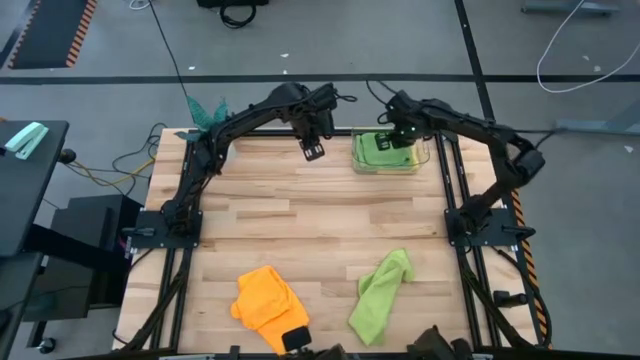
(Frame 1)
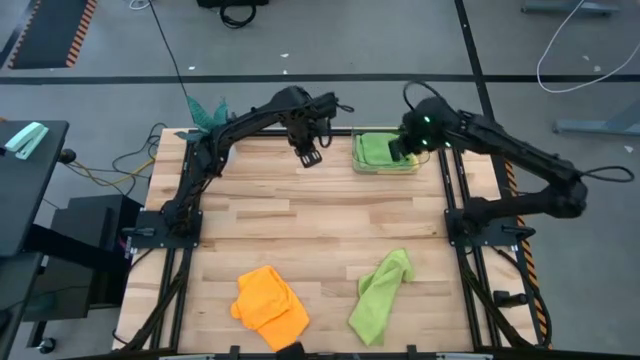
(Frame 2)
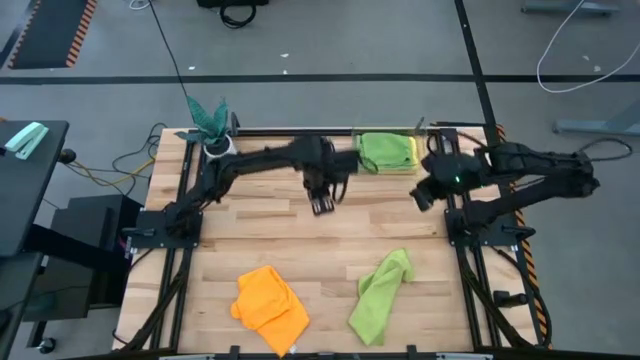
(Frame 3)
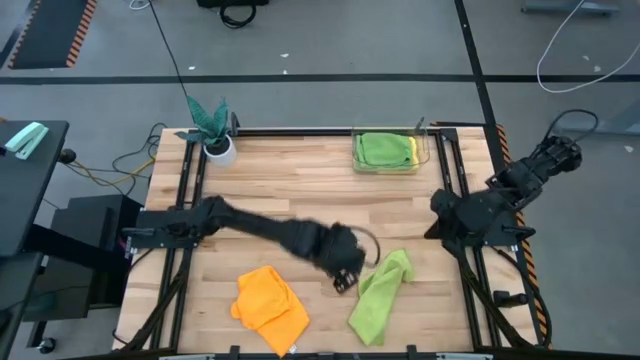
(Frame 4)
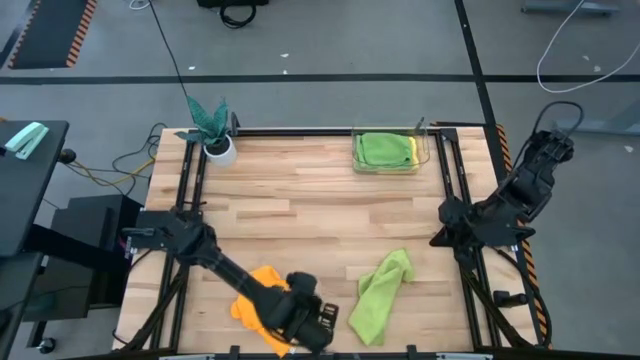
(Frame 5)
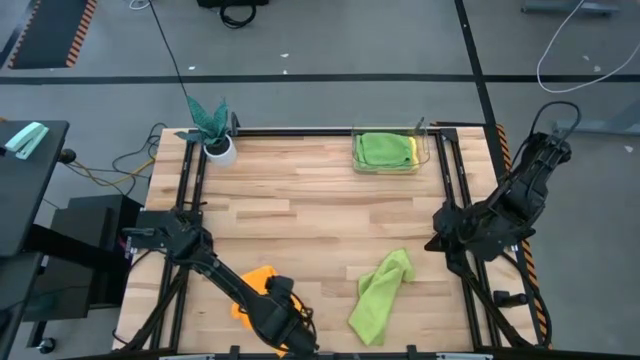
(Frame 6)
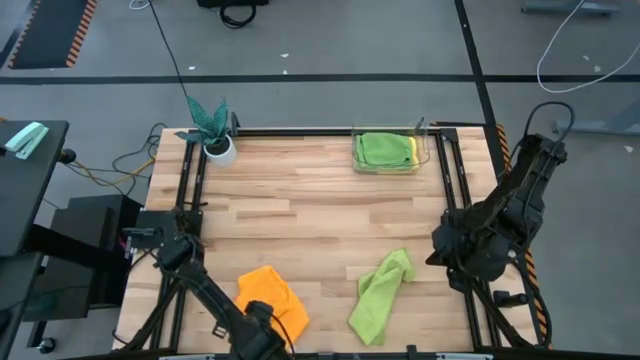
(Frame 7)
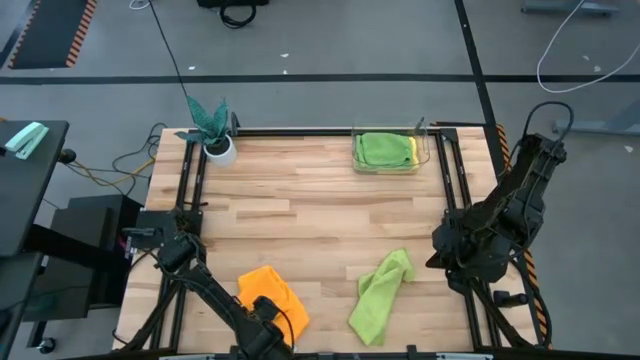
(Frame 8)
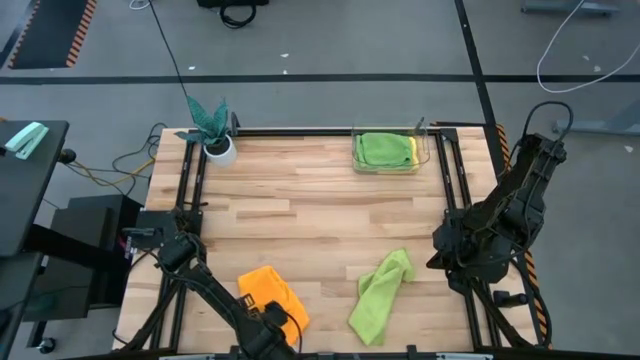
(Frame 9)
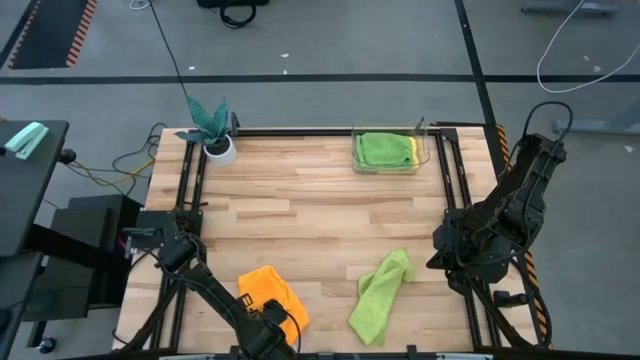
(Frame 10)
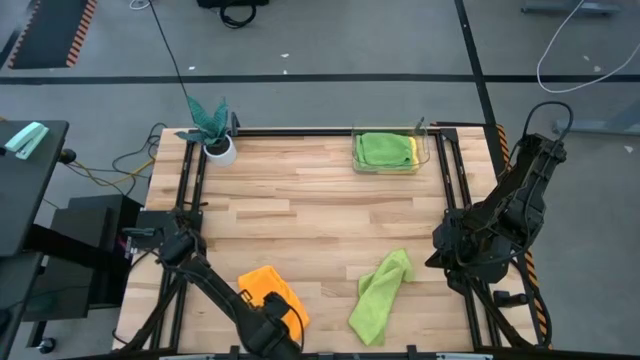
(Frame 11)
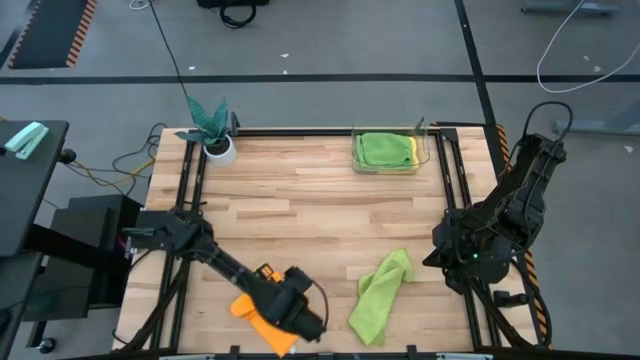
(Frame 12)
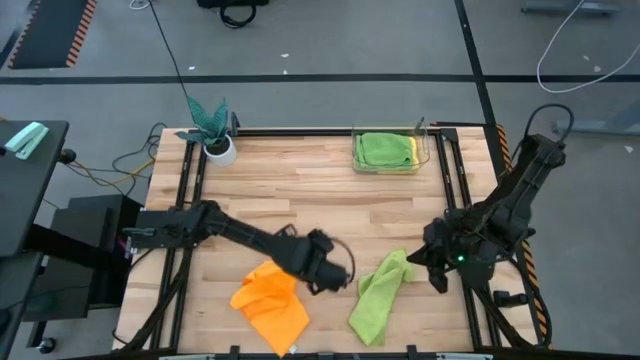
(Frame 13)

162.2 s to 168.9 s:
Task: Fold microfiber towels
Fold the orange towel

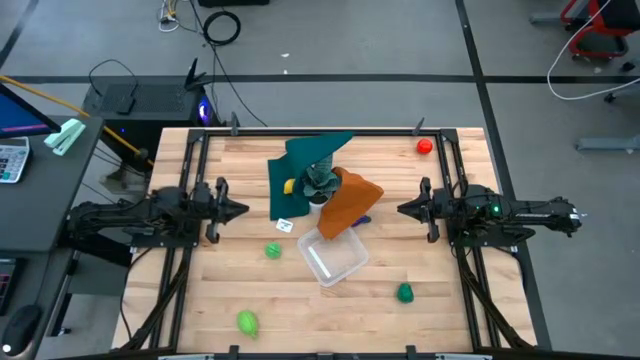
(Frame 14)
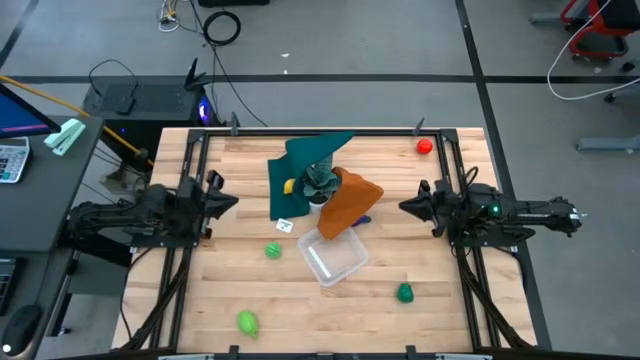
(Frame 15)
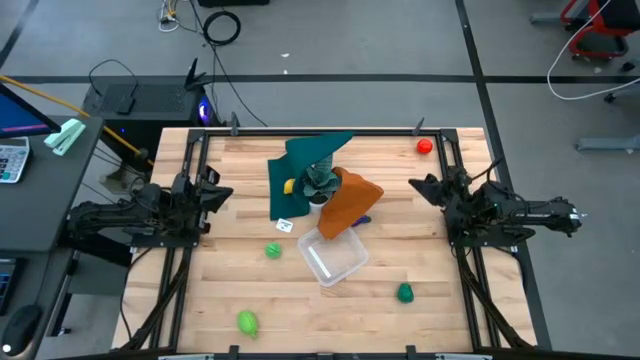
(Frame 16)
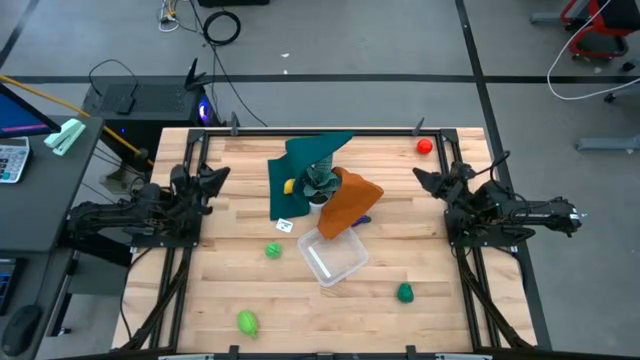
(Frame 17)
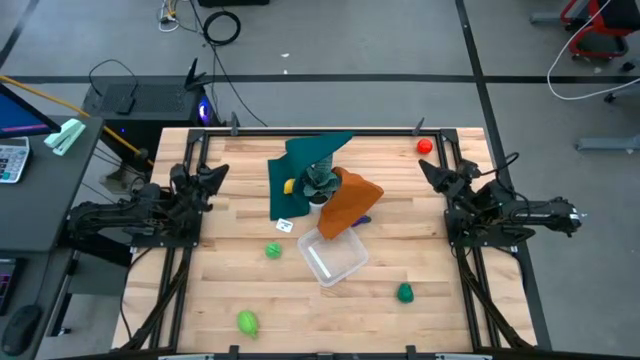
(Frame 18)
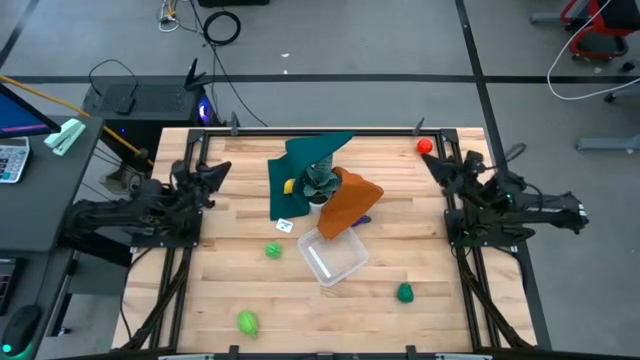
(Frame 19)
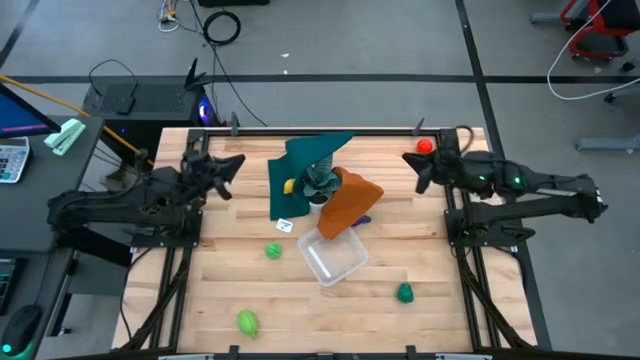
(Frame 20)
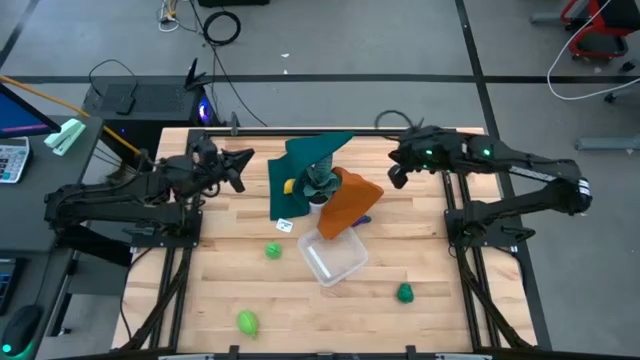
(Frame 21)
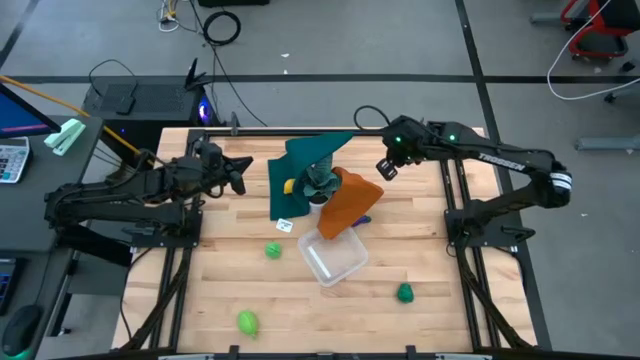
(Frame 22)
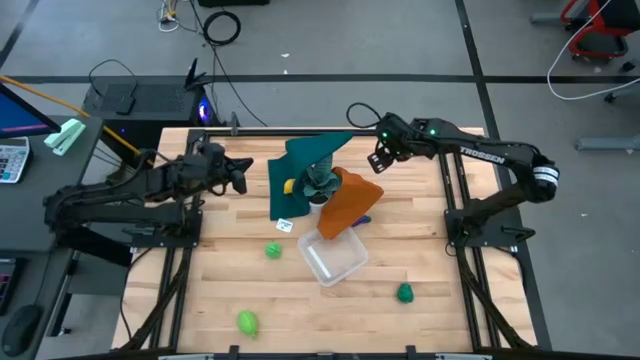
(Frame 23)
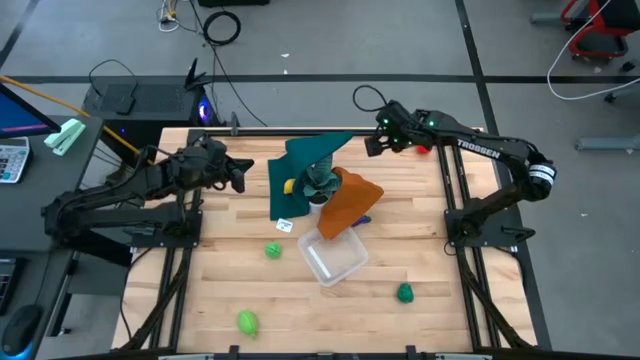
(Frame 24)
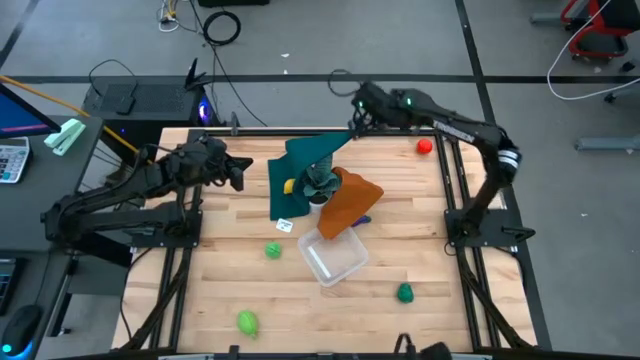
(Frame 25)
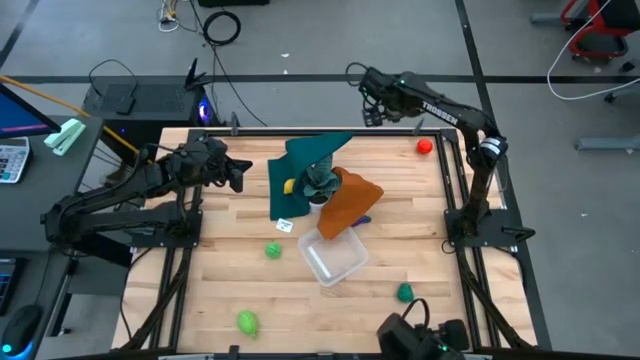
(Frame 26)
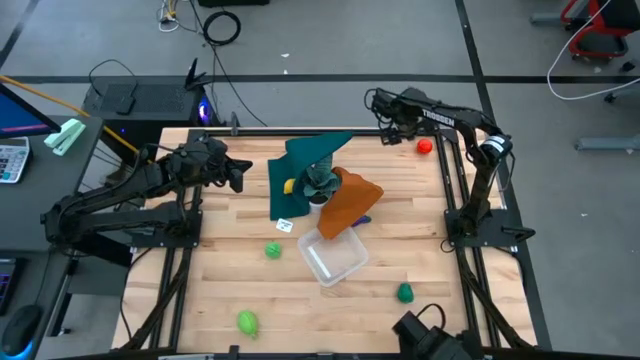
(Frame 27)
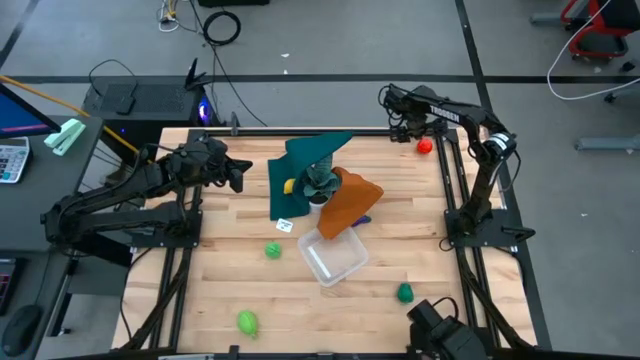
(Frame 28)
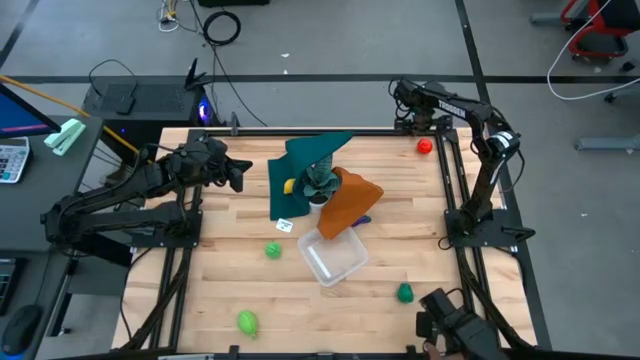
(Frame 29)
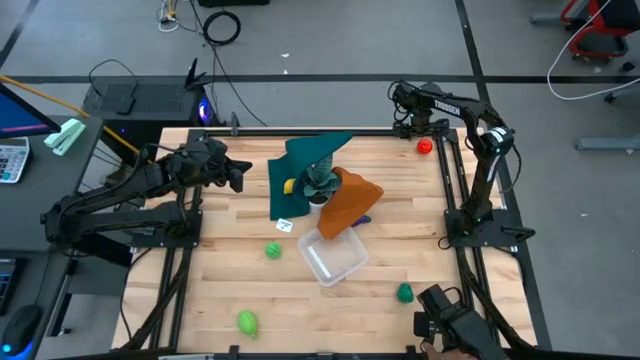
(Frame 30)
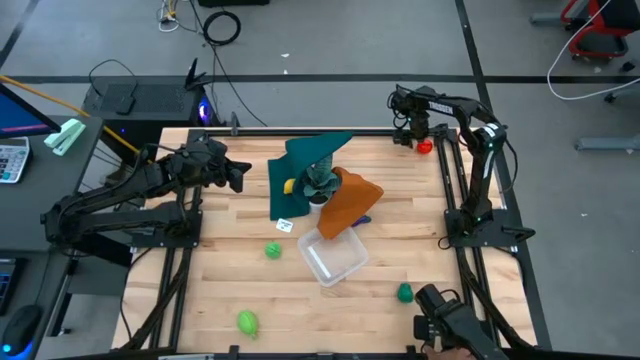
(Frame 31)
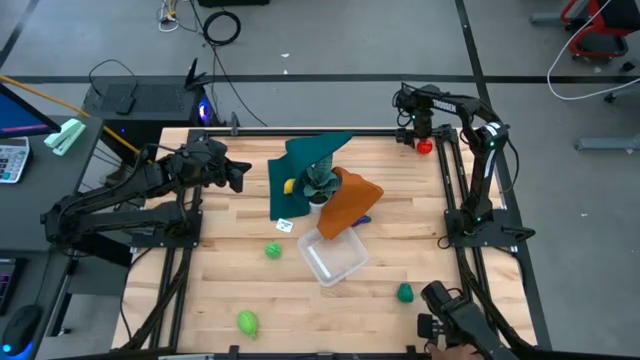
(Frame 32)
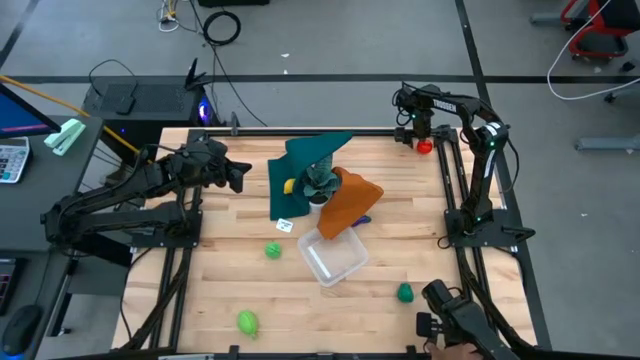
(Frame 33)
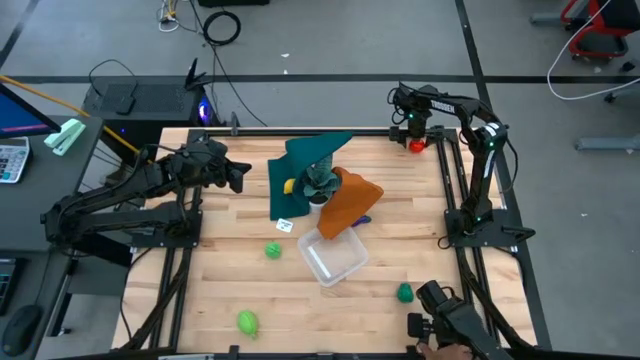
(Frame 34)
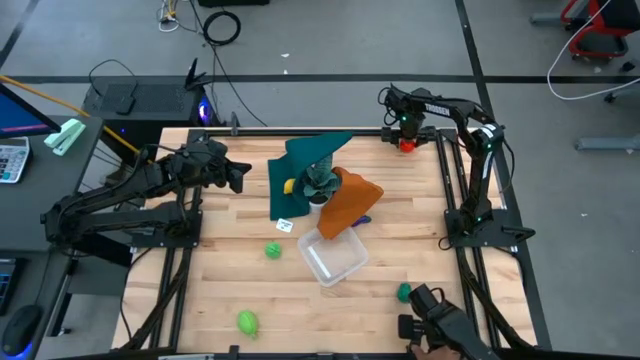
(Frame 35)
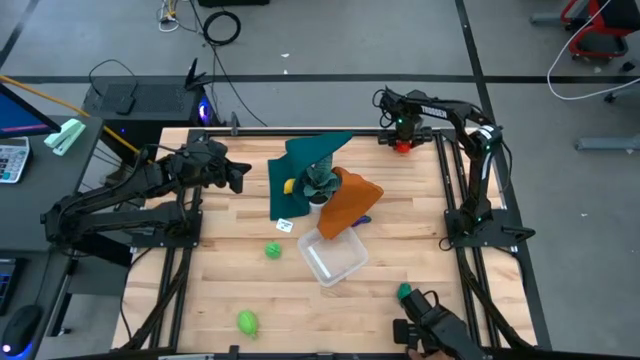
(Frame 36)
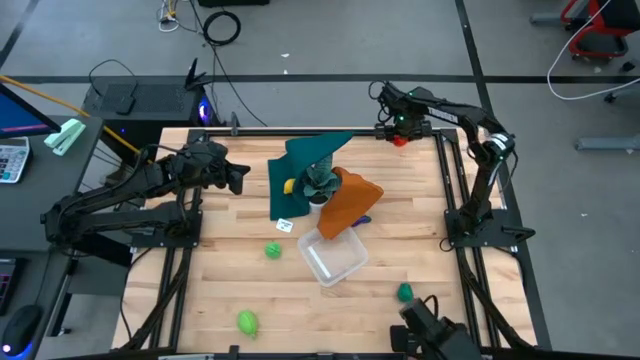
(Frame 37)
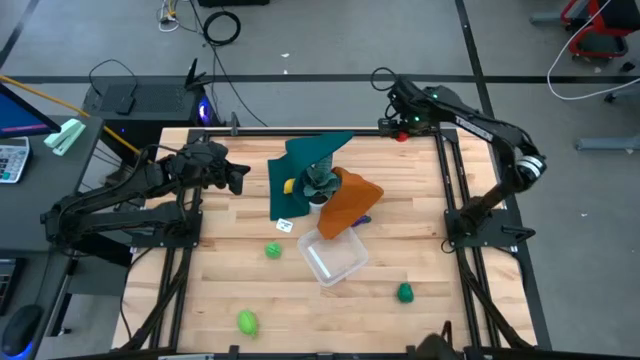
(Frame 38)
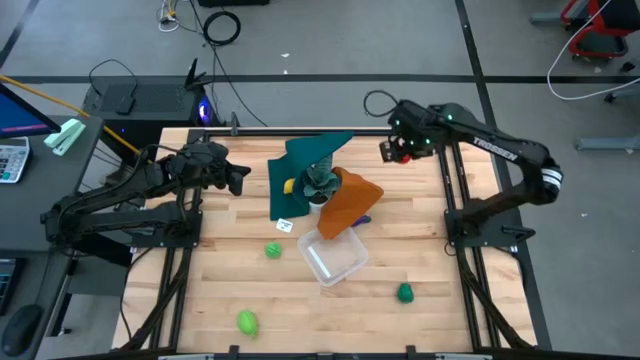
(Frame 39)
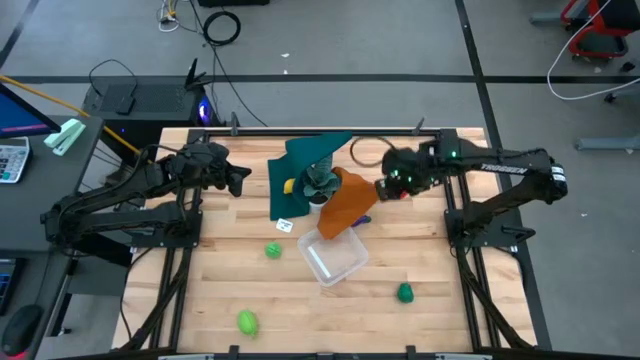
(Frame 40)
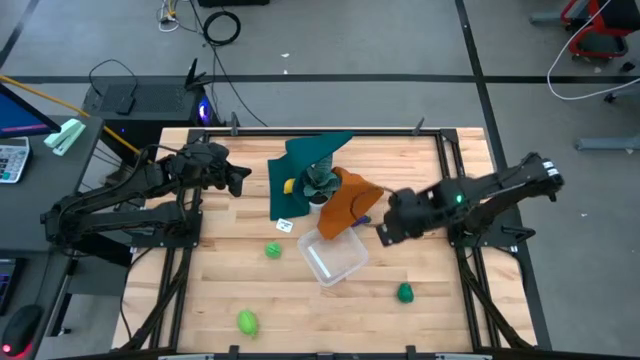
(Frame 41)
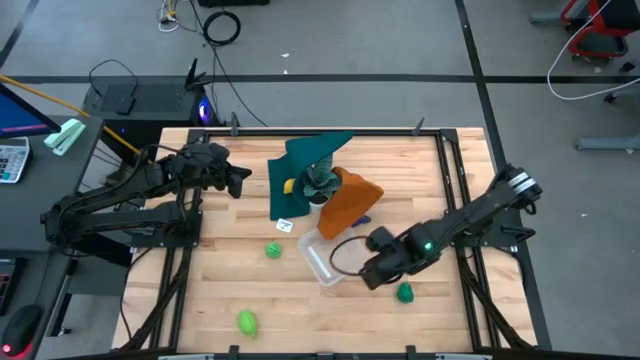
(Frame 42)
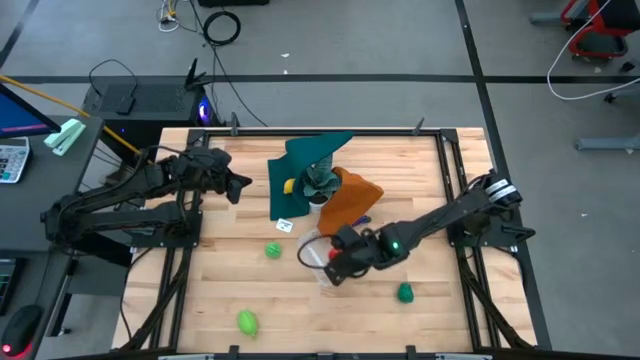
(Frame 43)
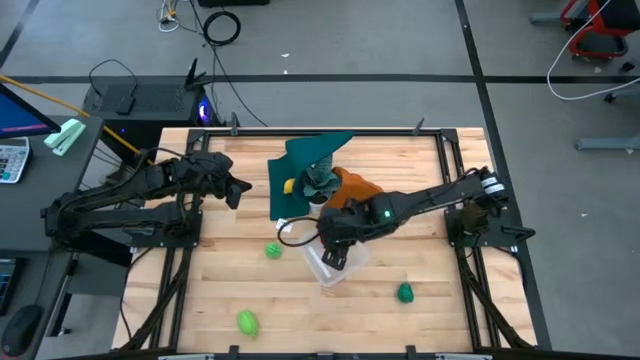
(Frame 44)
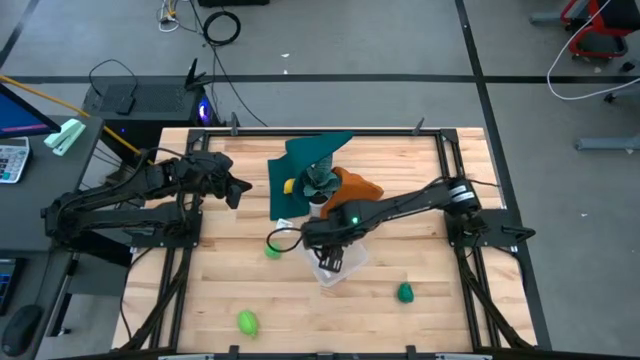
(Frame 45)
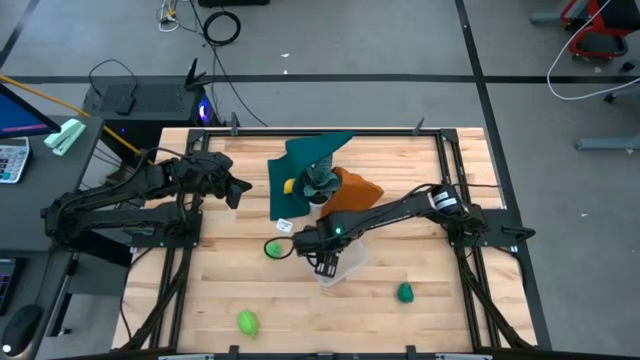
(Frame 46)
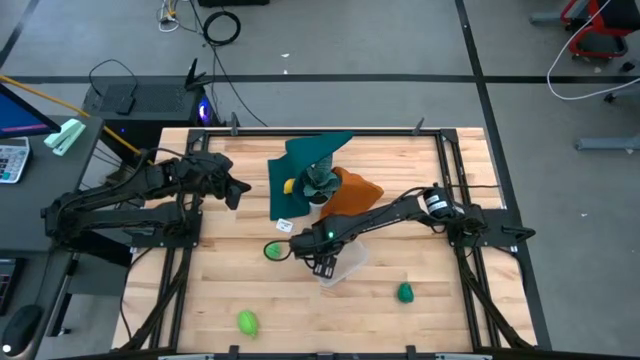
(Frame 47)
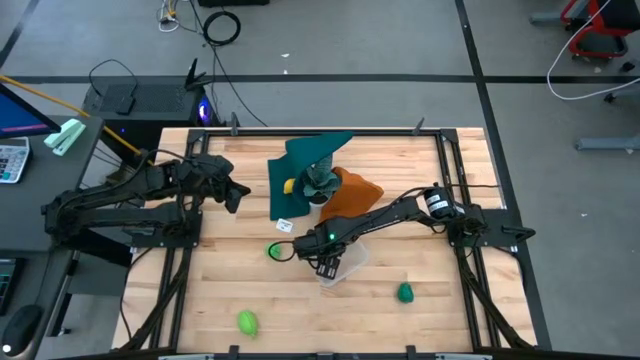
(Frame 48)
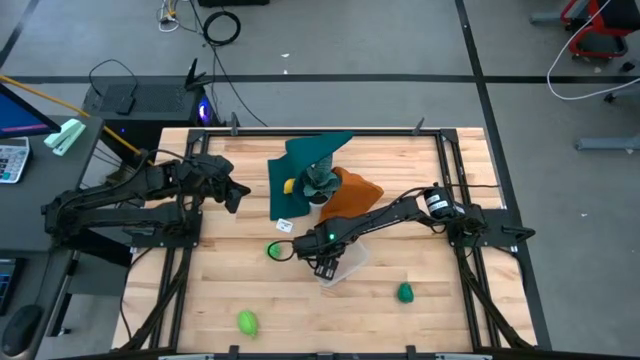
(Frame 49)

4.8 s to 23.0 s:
Task: Pick and placing Produce into tupperware
Put the tomato into the transparent bin
